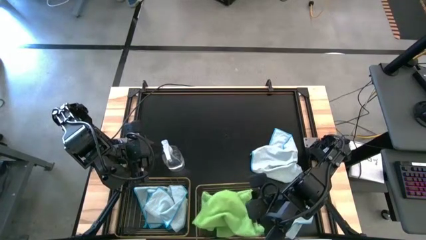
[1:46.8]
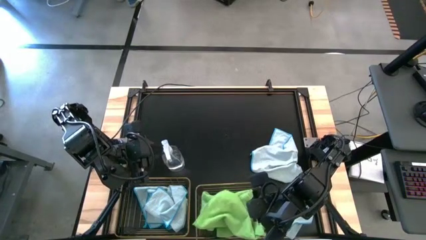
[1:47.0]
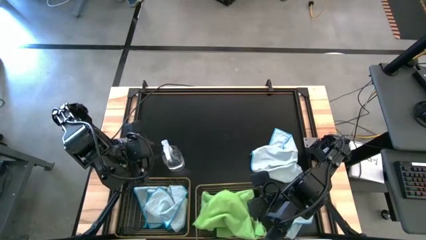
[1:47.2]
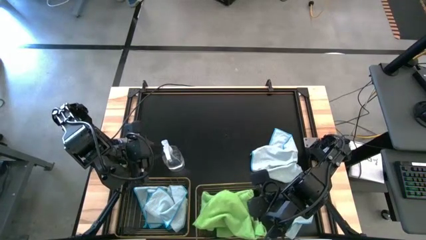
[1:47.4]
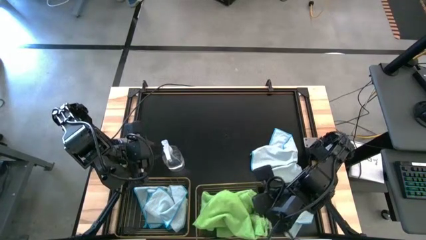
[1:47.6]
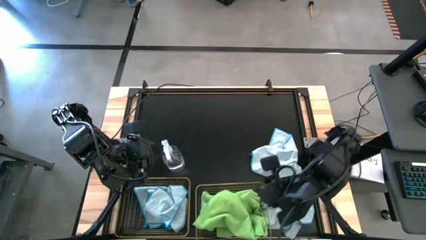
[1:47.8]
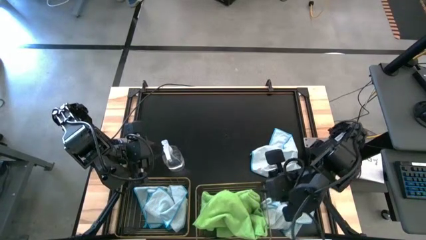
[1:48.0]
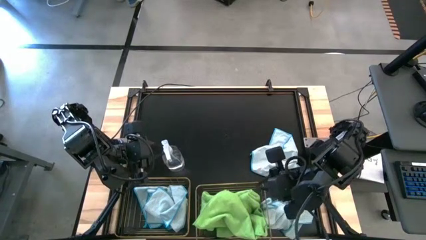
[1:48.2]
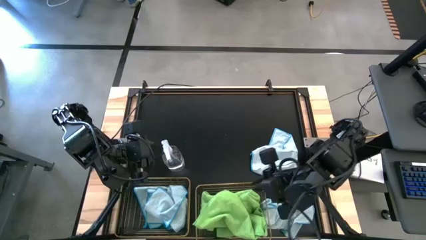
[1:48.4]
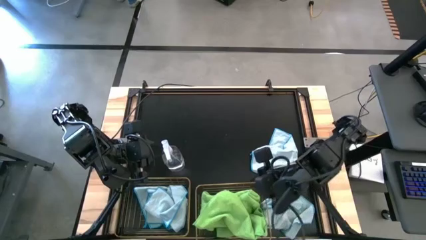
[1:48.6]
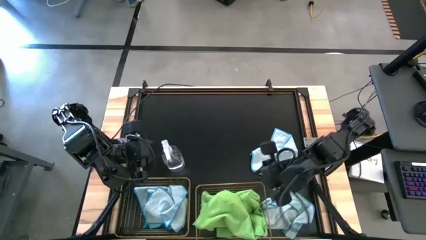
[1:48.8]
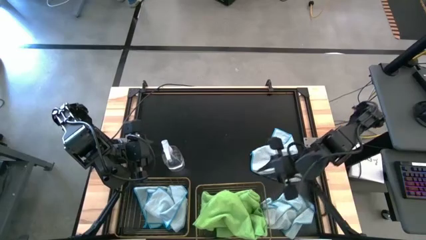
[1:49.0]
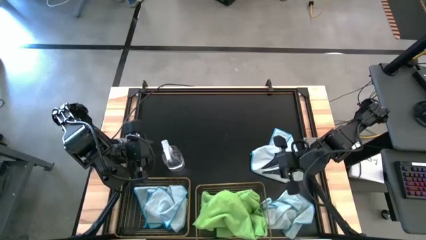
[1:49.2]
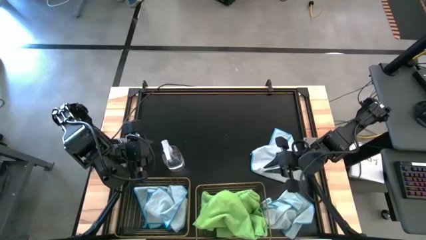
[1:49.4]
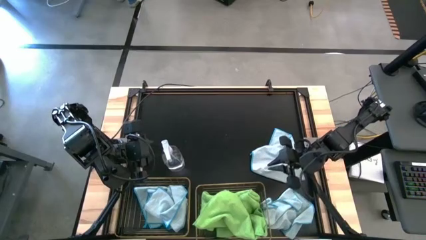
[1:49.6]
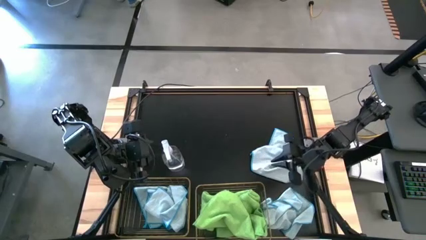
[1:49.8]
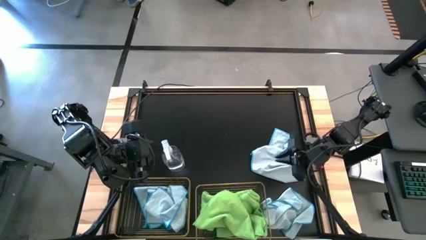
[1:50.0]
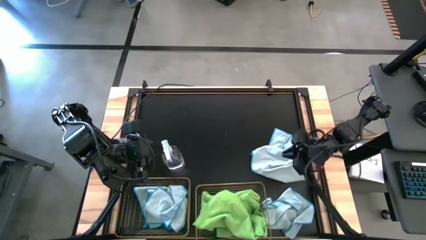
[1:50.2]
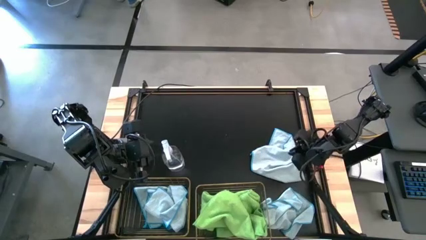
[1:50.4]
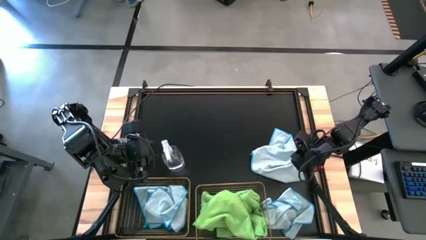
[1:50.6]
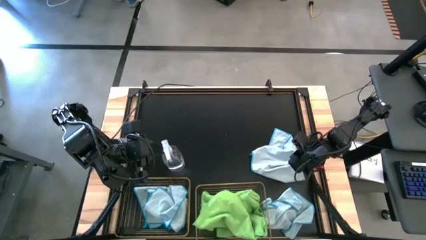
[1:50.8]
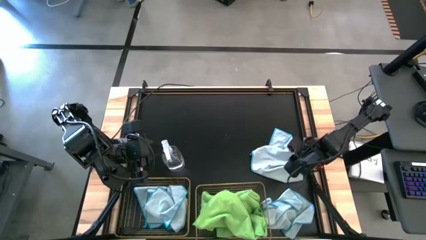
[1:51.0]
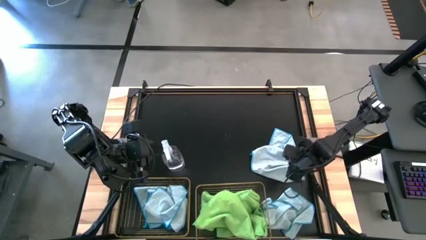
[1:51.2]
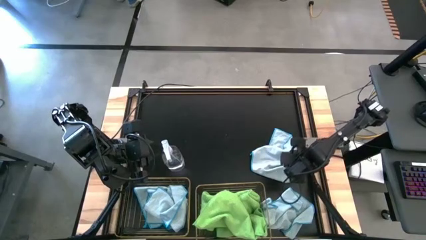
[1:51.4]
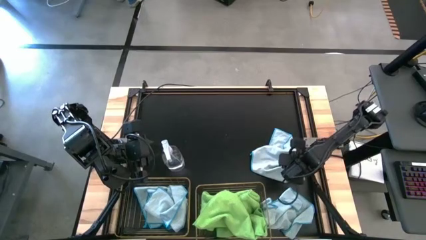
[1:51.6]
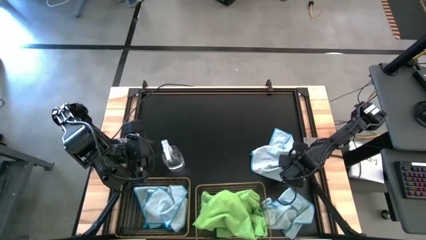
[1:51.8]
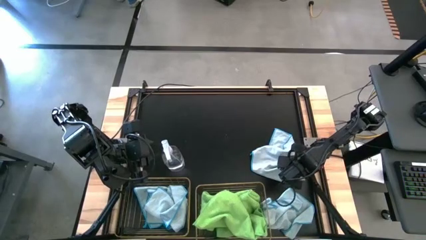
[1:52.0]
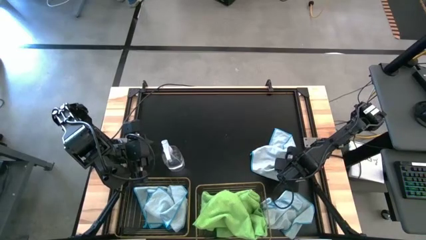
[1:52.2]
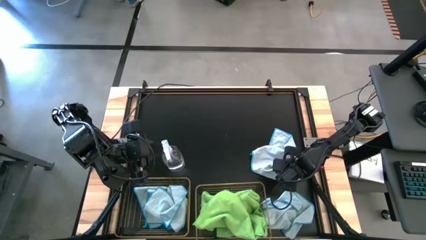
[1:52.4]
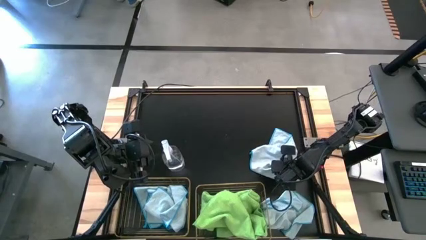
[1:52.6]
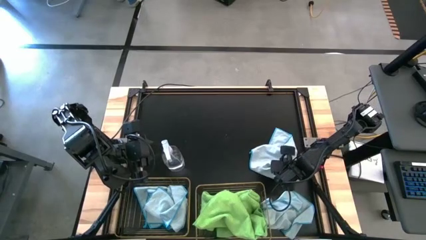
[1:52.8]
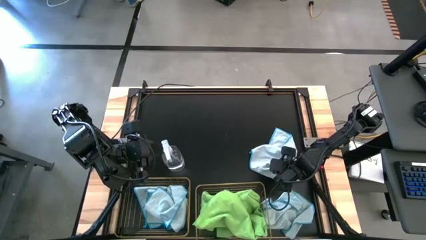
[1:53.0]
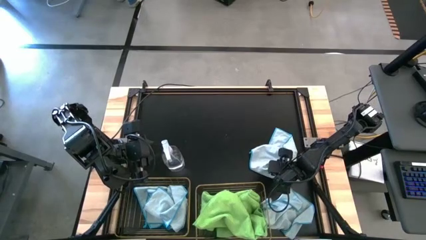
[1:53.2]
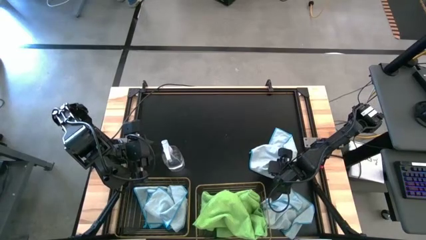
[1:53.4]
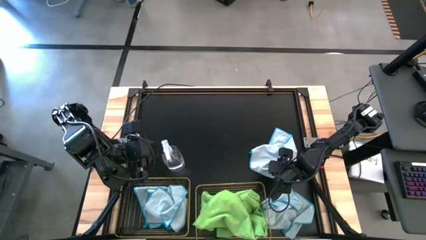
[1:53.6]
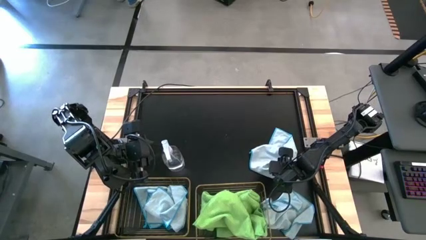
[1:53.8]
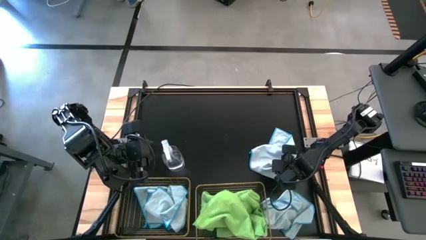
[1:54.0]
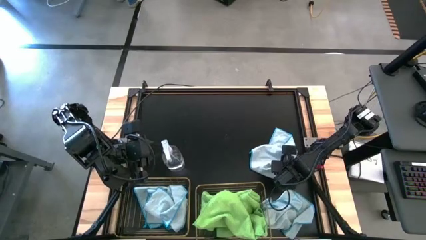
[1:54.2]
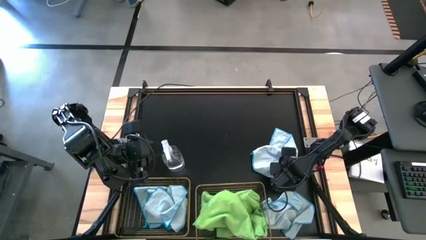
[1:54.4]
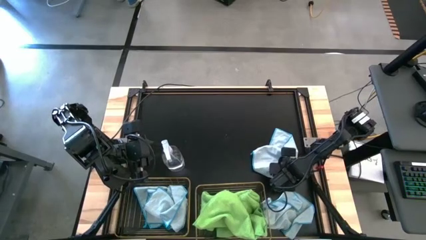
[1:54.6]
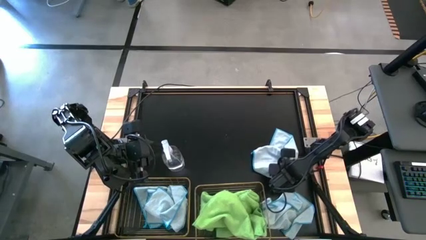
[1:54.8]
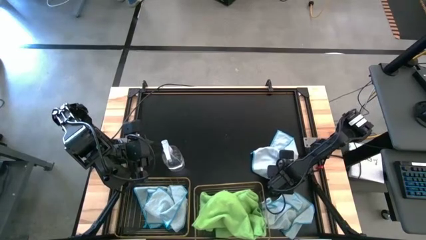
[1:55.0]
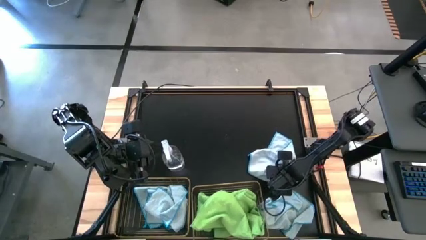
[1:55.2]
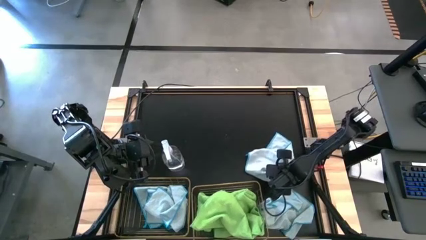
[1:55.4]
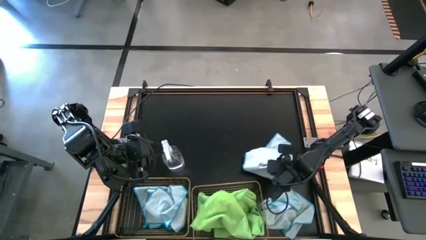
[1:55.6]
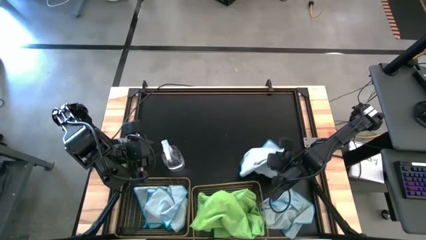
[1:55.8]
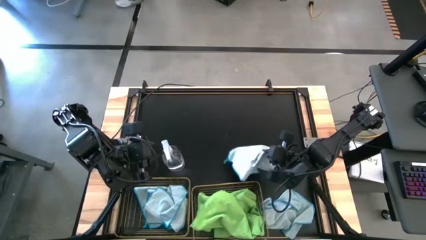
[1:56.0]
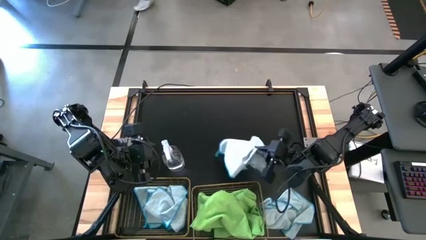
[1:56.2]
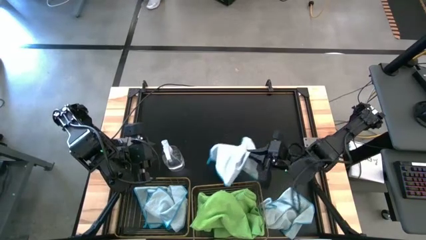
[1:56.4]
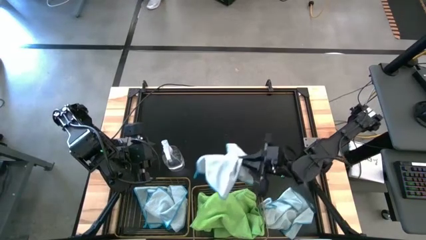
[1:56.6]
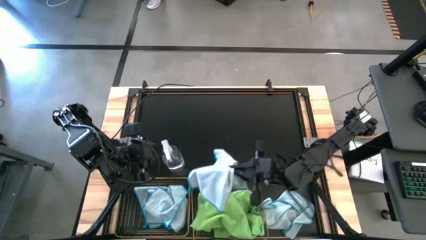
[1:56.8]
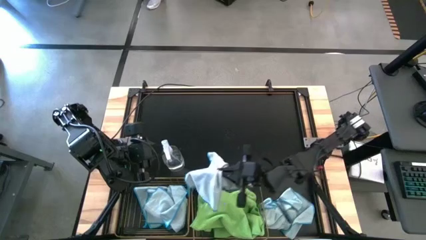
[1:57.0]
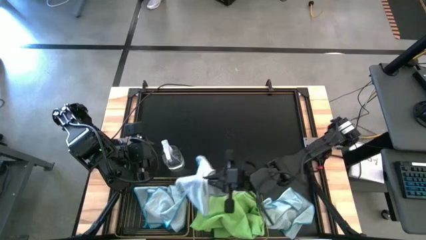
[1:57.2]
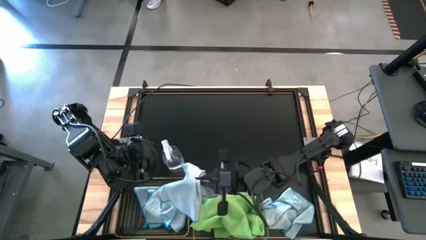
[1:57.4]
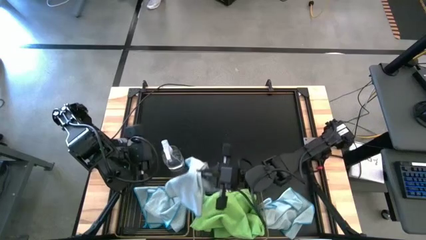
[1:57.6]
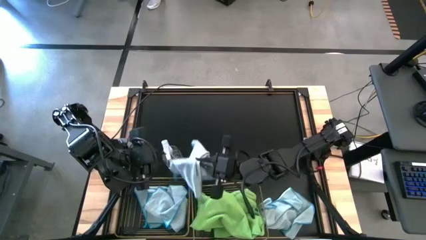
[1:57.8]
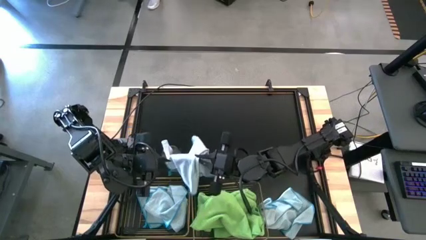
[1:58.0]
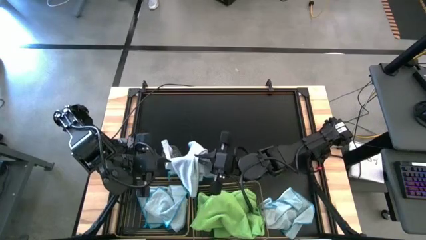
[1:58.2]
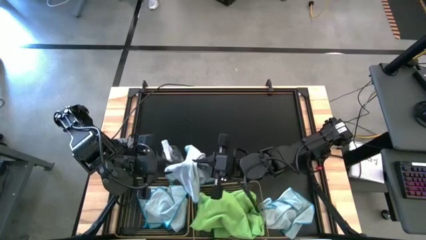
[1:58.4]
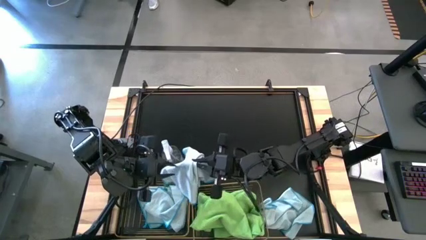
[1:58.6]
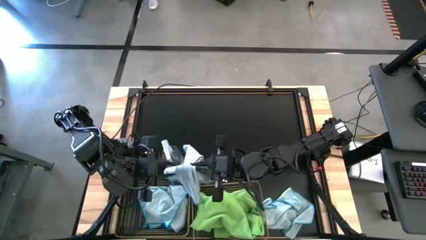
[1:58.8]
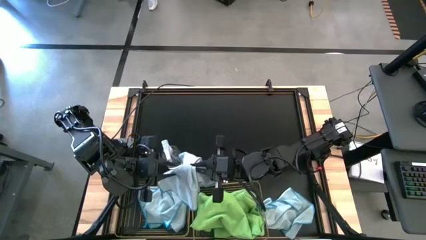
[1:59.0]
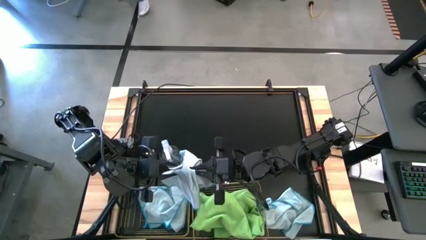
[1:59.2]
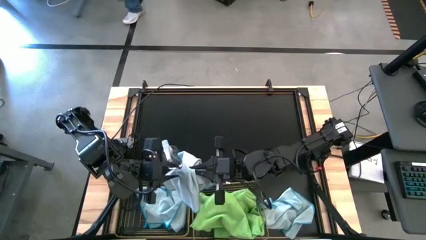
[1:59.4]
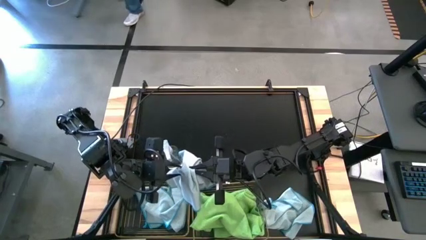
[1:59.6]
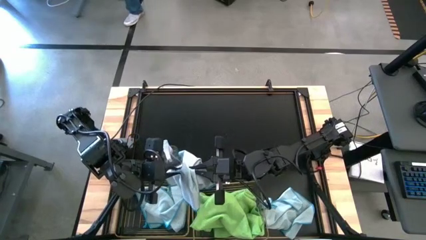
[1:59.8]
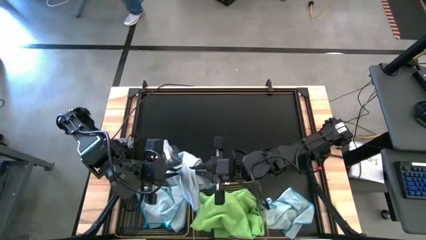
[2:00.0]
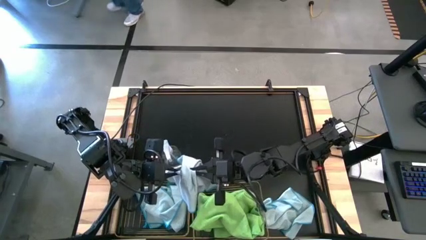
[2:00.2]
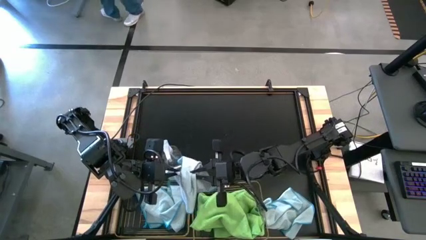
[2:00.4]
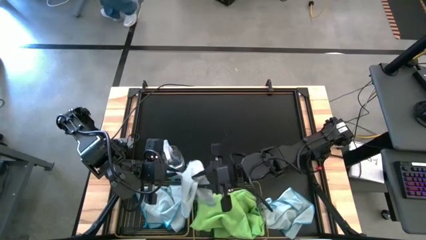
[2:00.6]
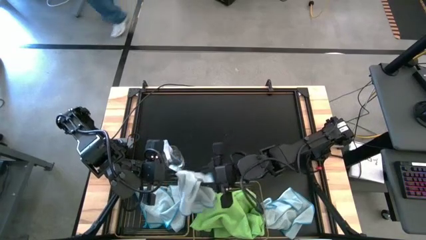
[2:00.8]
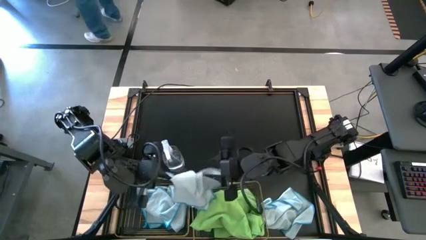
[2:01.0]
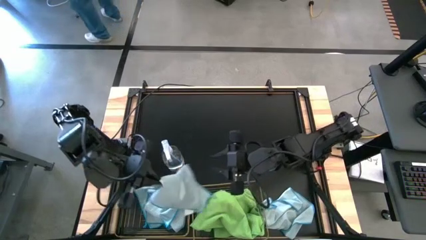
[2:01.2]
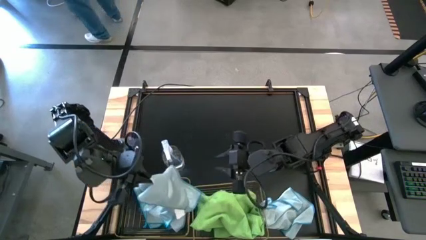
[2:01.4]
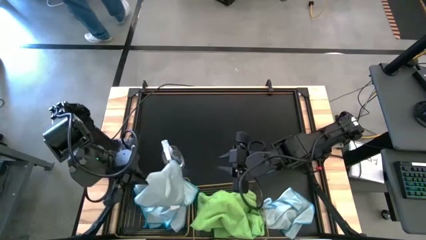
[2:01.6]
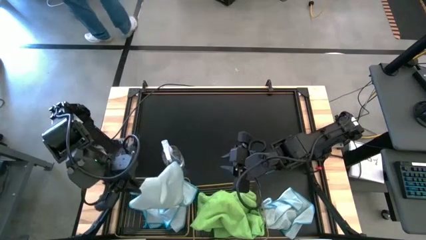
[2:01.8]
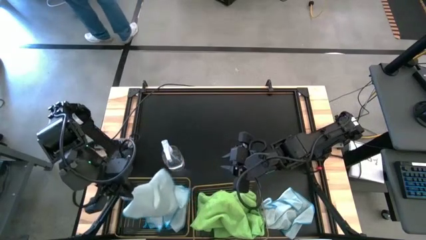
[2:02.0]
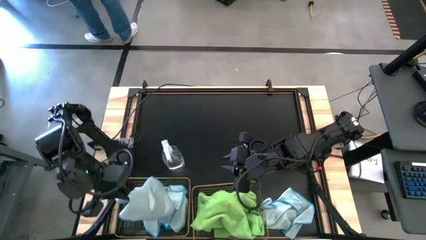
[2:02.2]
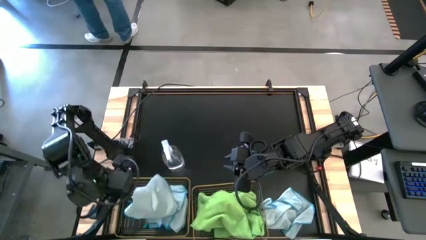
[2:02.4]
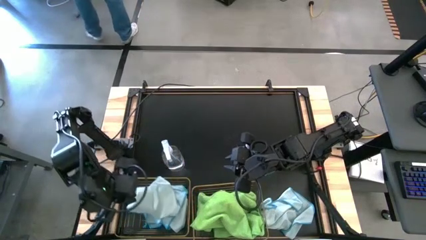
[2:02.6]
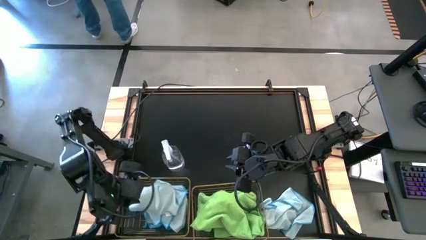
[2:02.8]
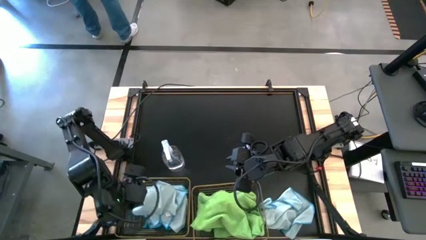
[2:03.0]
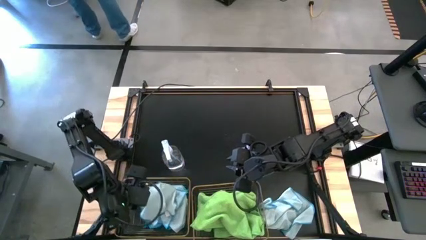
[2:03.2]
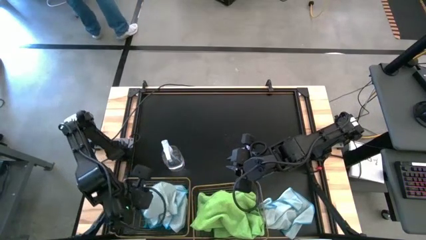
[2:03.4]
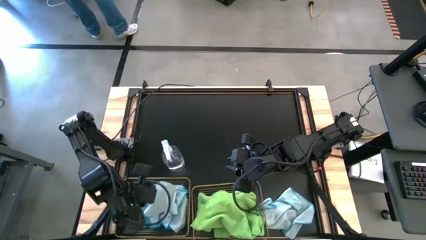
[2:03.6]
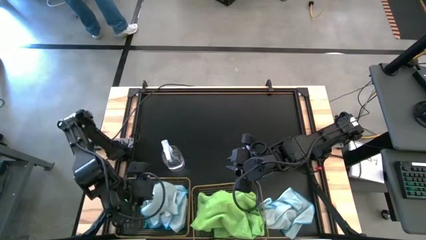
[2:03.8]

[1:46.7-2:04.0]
Task: Sort microfiber towel by color & place in baskets
Put the white microfiber cloth into the left wire basket
